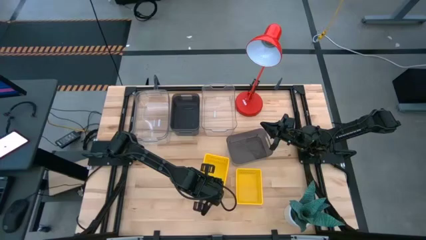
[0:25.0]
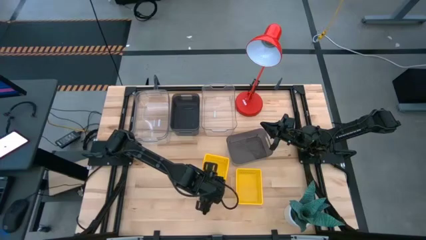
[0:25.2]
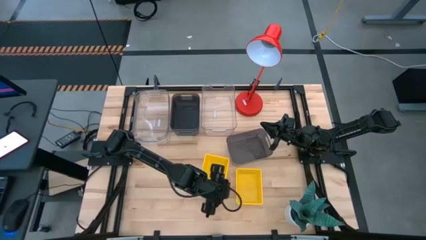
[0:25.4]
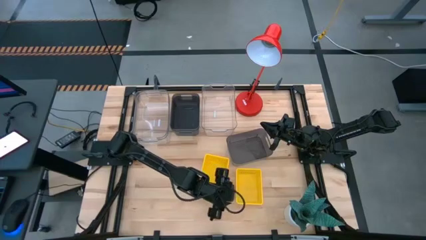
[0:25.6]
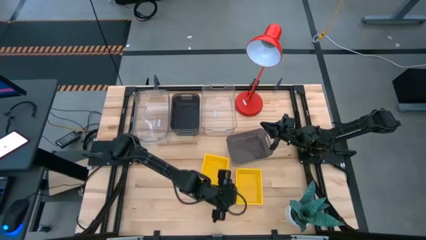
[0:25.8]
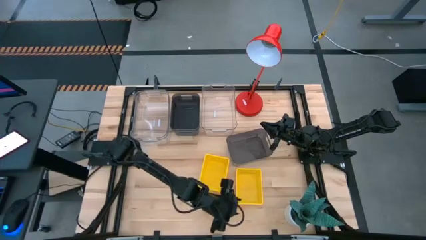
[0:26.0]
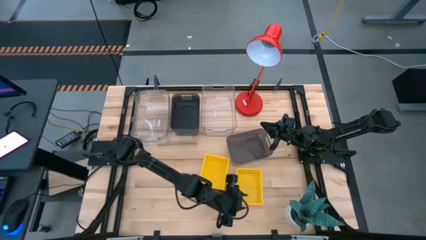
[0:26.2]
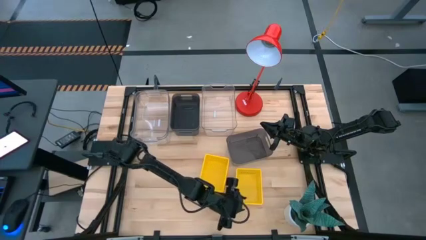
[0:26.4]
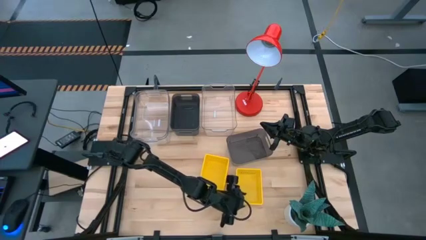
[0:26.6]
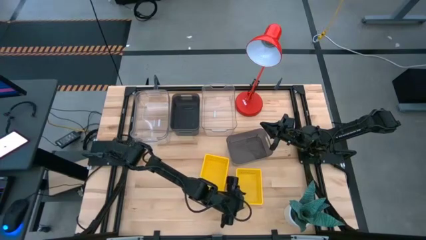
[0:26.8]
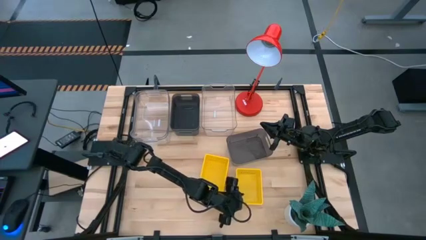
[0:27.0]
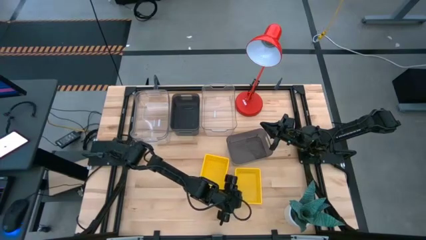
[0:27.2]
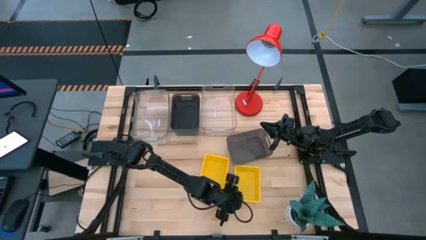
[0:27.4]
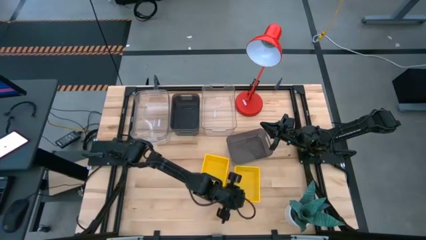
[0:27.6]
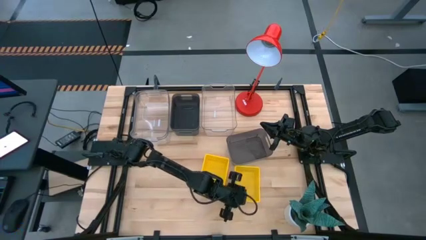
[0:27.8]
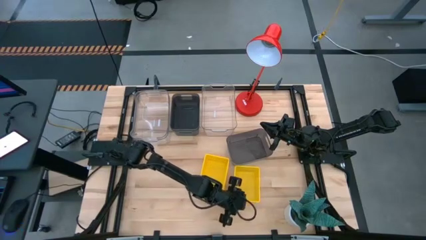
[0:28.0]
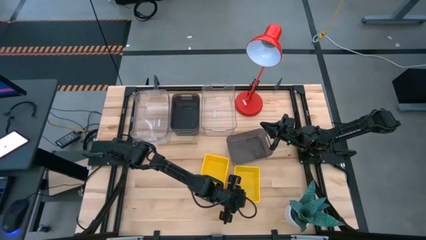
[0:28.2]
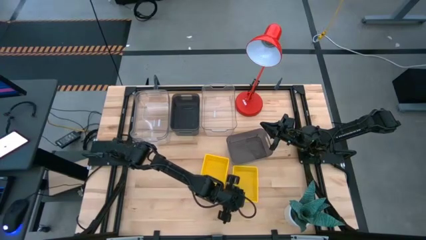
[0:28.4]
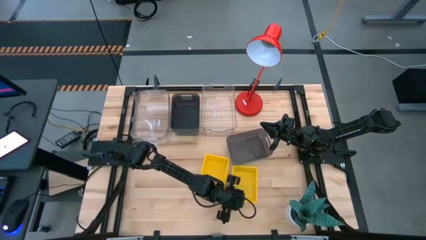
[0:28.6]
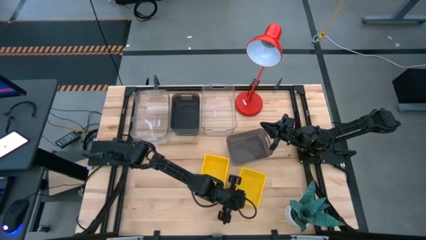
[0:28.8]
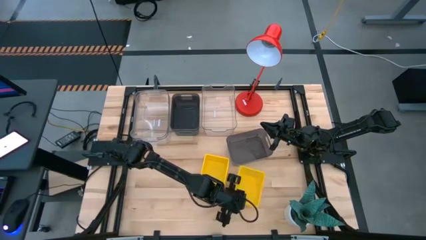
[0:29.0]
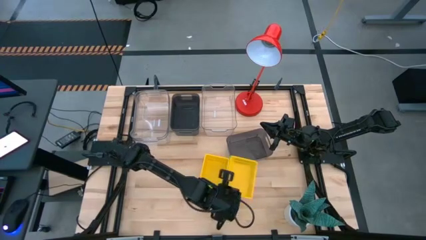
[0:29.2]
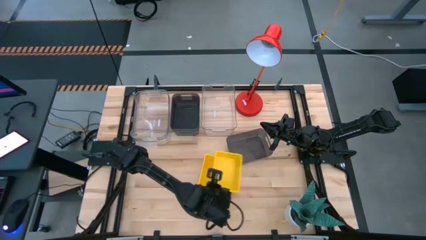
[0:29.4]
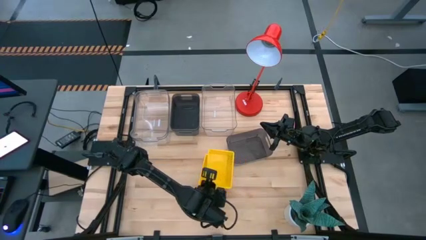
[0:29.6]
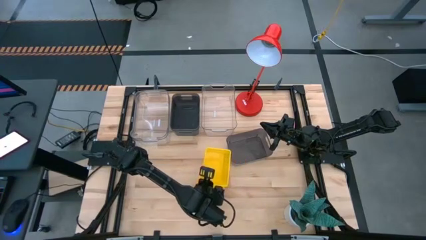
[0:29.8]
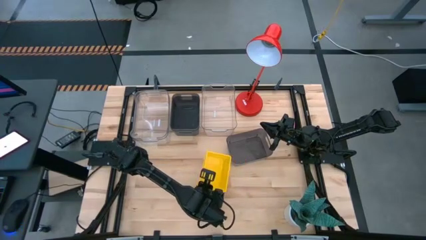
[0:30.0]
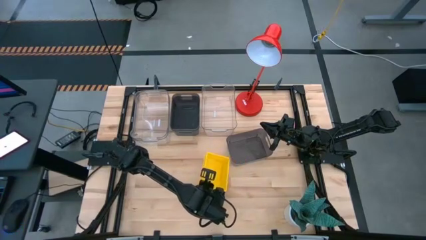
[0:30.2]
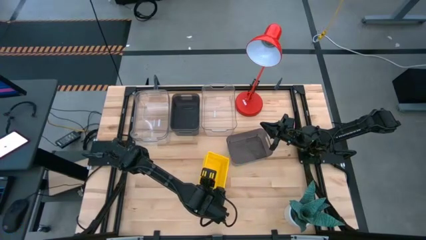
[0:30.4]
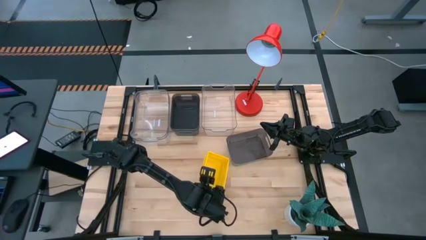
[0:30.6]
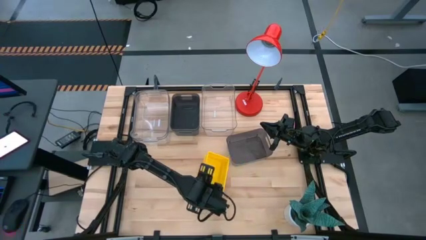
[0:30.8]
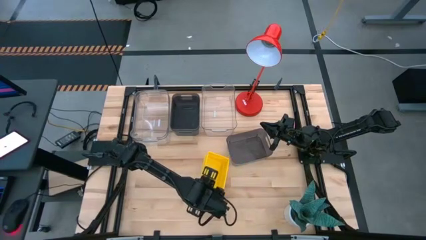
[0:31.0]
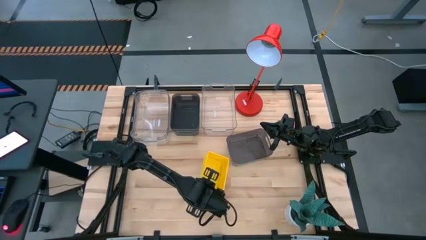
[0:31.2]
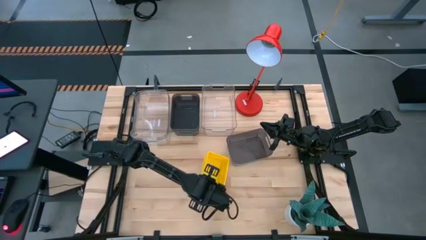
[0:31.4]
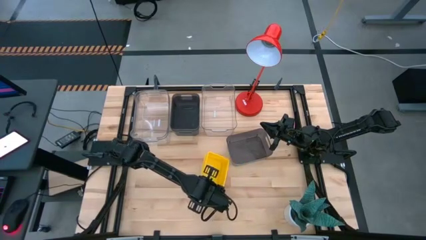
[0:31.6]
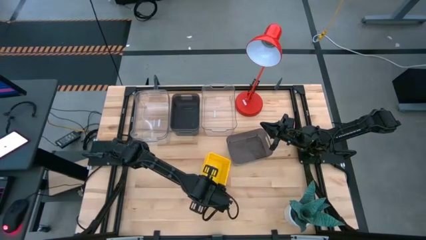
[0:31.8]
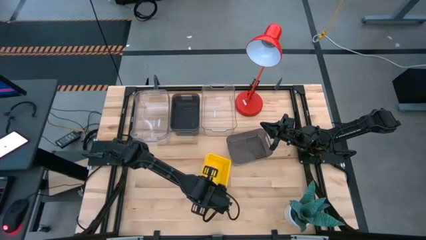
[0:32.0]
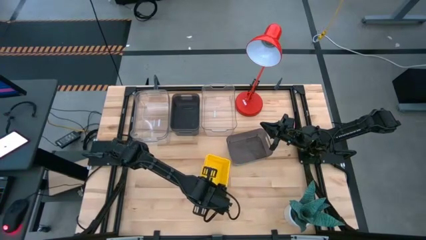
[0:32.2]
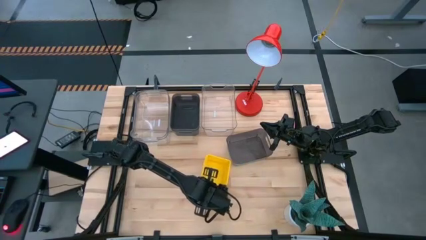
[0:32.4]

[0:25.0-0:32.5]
Stack the right yellow bin on top of the left yellow bin

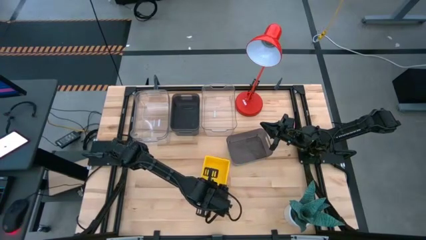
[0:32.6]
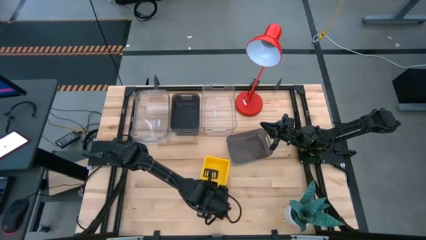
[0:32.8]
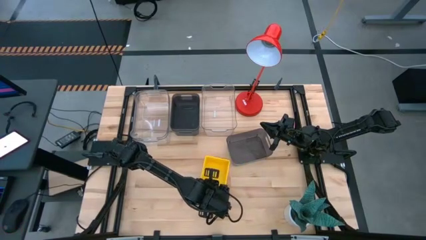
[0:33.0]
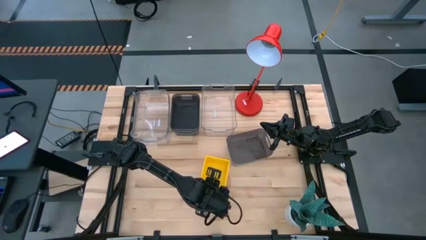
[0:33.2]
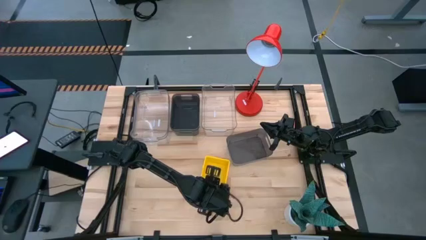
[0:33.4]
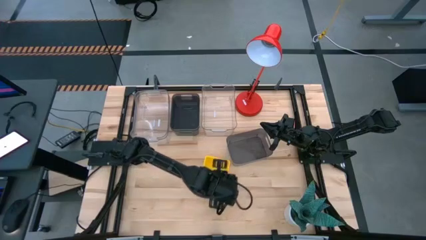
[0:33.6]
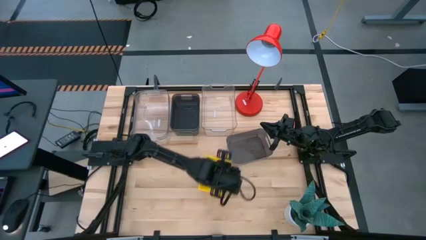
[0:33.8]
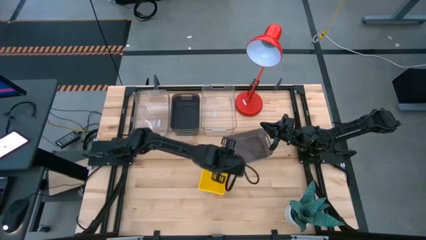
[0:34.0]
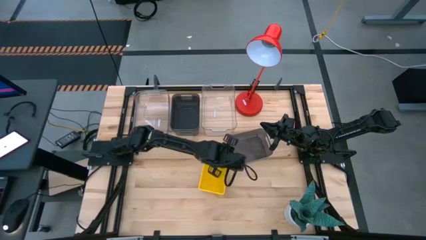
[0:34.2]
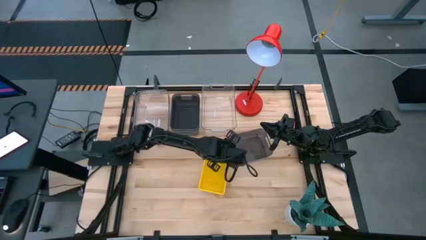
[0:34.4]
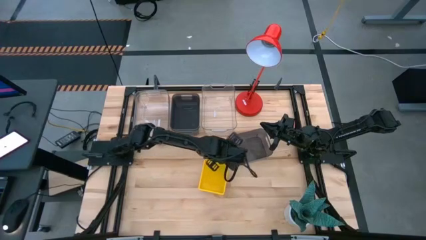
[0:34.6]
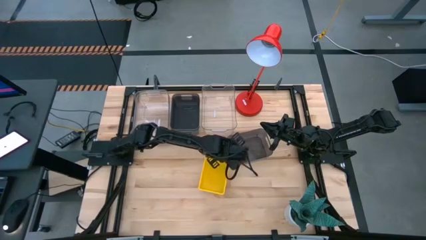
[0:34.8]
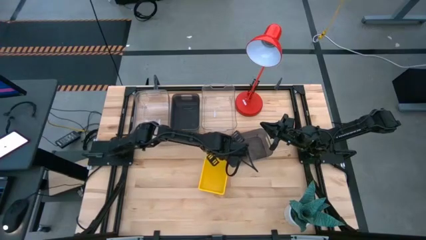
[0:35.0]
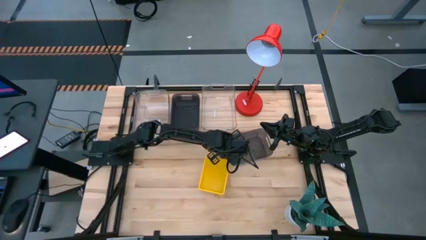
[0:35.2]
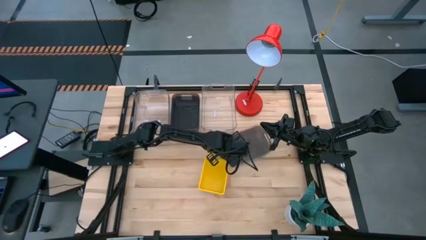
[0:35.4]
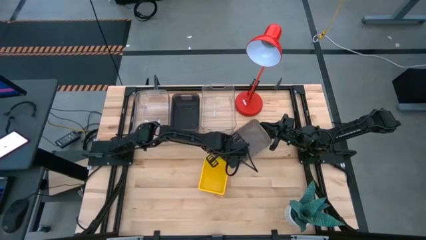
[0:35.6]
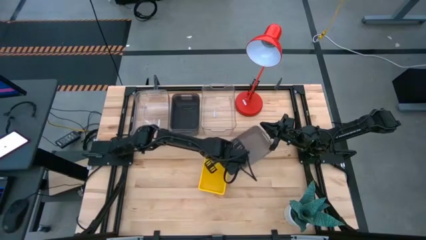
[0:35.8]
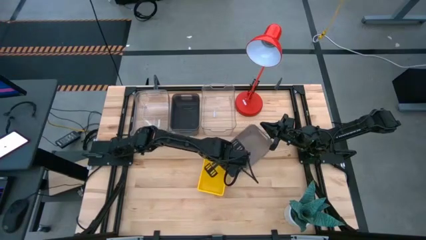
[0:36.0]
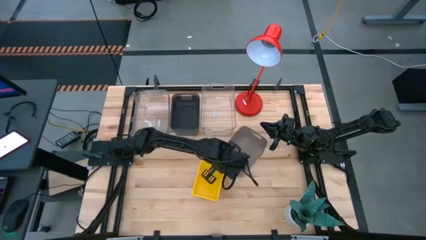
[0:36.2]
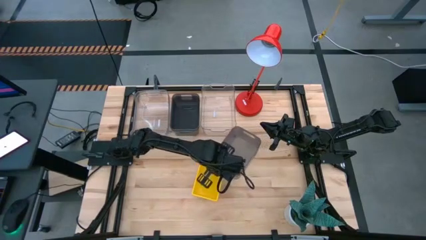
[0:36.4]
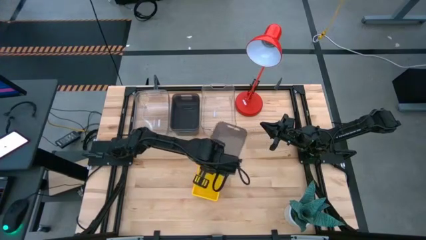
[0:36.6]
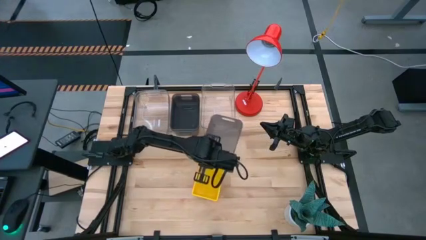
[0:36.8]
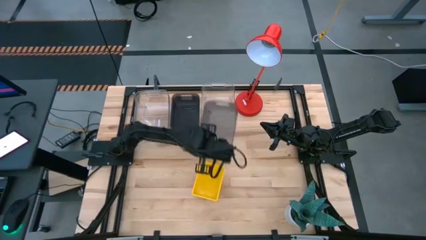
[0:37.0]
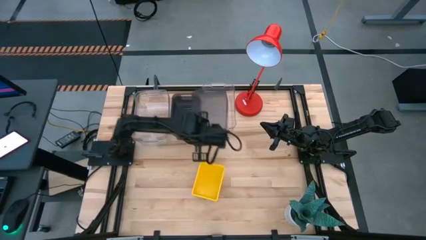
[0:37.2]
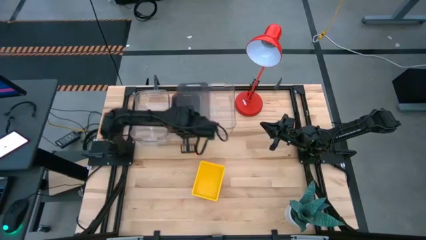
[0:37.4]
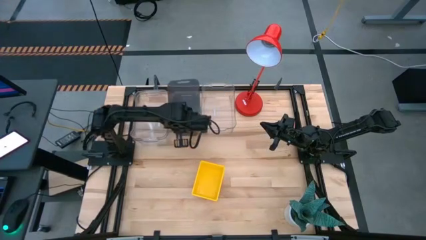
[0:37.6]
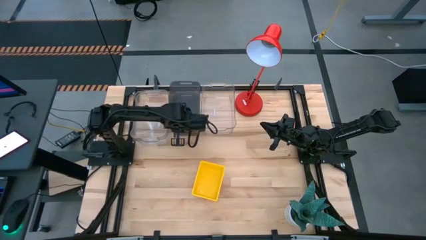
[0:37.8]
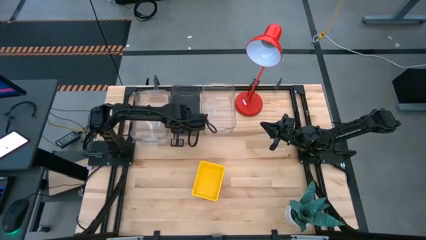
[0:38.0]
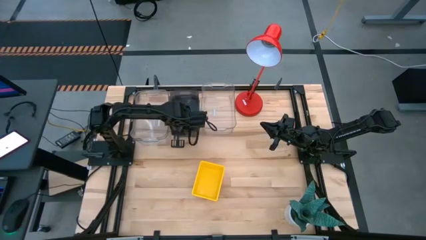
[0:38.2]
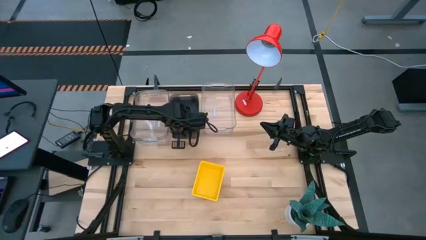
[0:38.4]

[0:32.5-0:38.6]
Stack the bottom black bin on top of the top black bin

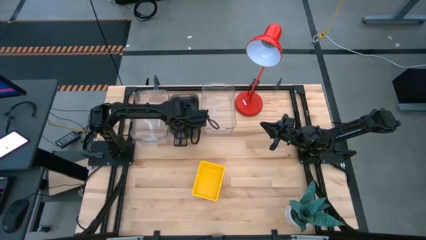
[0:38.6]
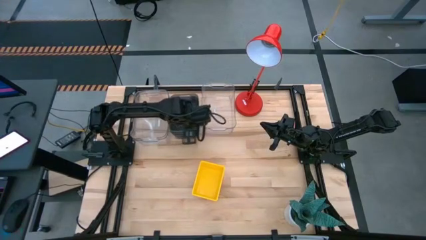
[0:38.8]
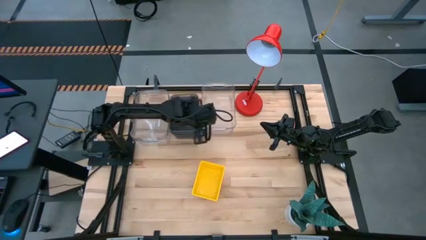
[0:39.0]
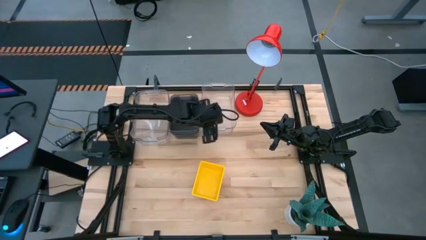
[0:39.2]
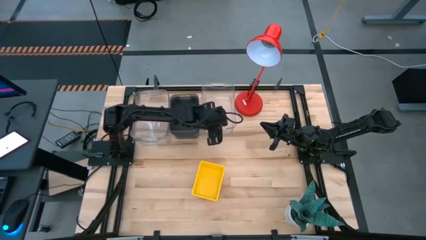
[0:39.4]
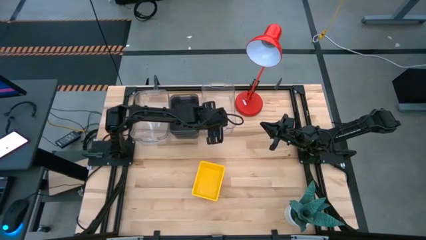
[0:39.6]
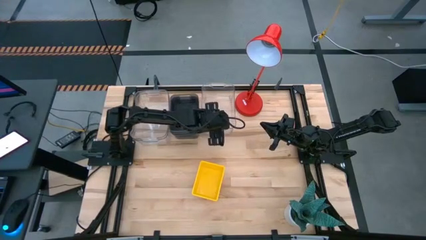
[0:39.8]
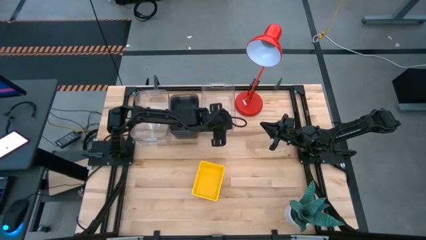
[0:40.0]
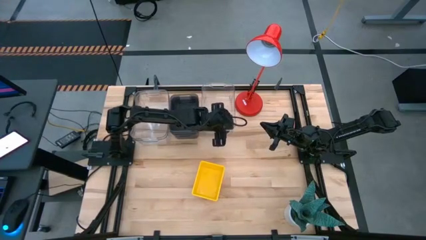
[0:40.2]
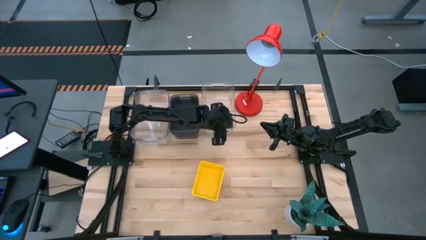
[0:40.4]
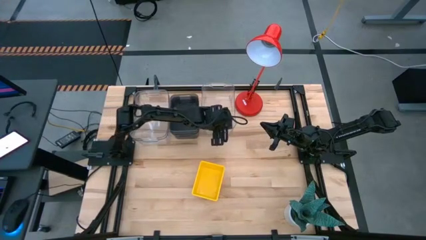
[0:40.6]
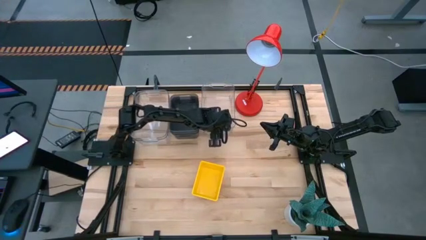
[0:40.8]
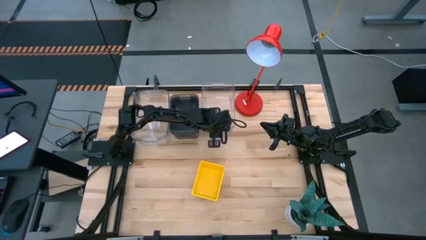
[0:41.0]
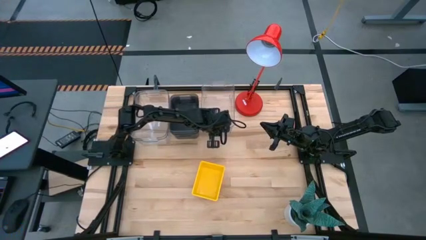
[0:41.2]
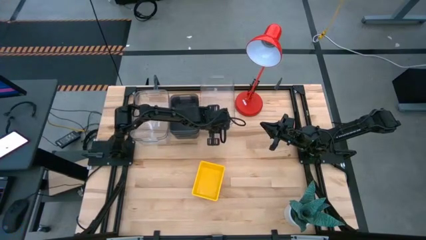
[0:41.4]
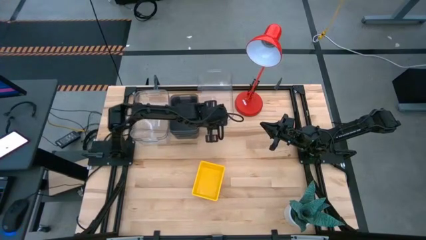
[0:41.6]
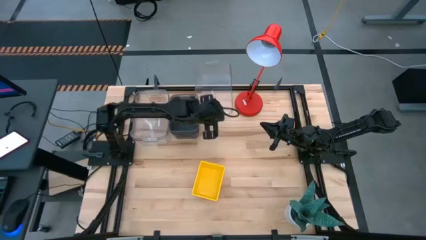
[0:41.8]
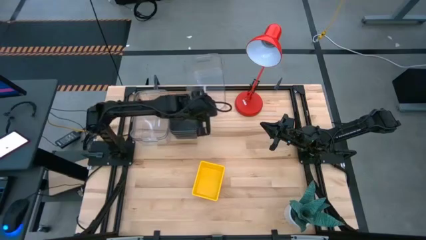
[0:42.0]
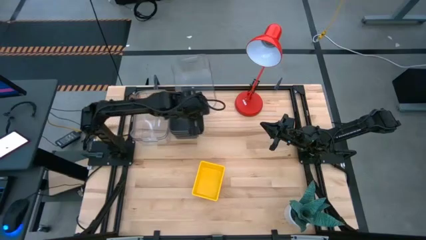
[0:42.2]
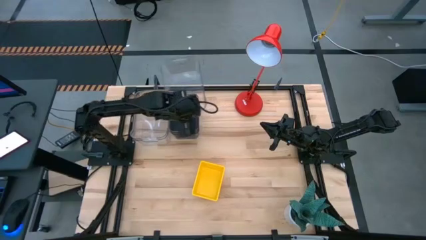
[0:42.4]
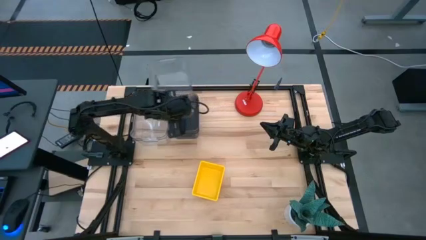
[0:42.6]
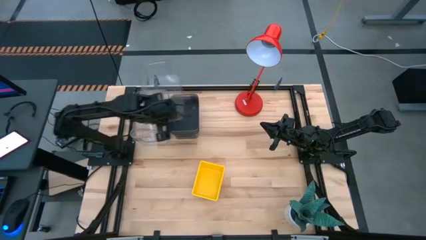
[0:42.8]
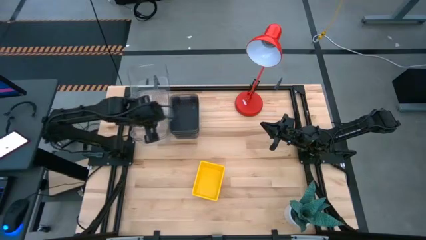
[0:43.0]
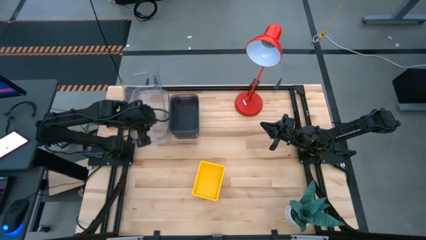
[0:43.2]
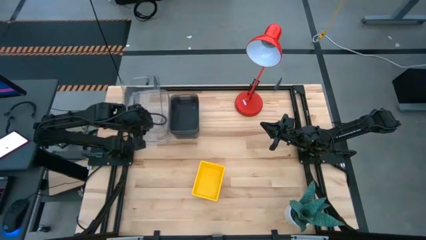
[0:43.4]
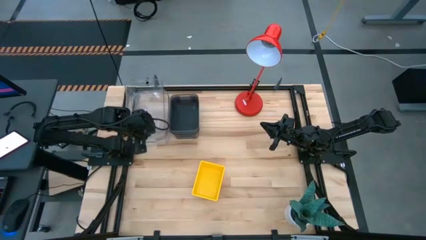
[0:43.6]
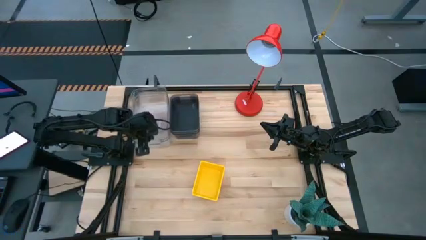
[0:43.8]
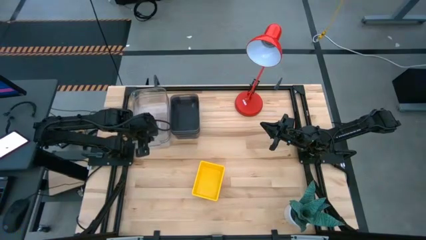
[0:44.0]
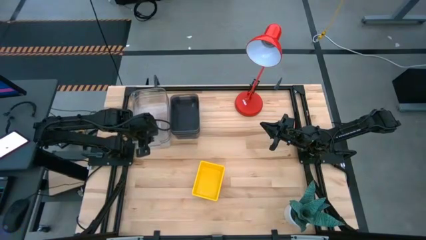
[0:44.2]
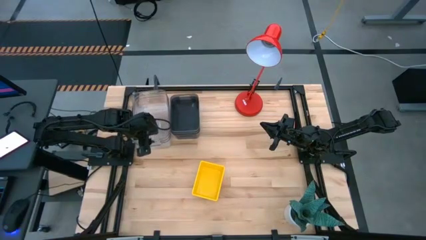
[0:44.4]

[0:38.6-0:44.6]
Stack the right transparent bin on top of the left transparent bin
